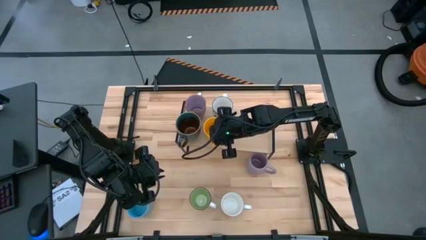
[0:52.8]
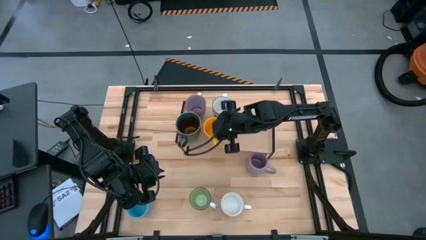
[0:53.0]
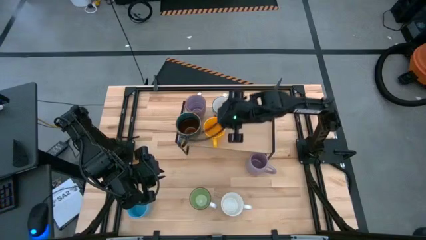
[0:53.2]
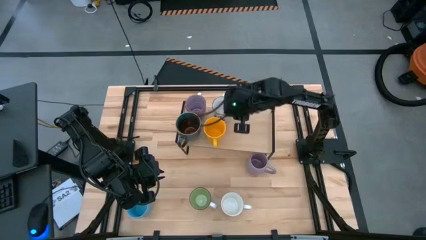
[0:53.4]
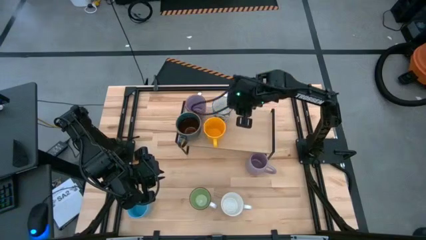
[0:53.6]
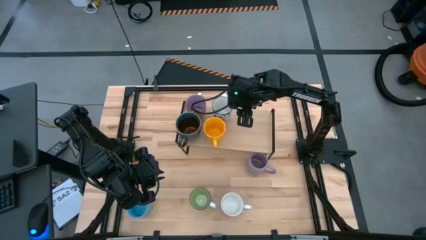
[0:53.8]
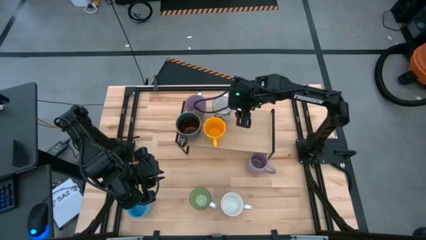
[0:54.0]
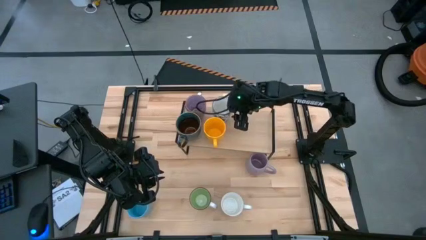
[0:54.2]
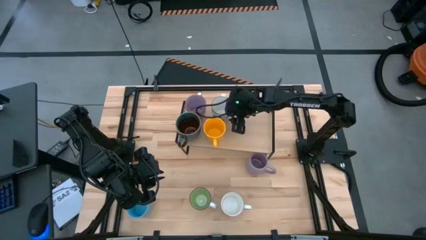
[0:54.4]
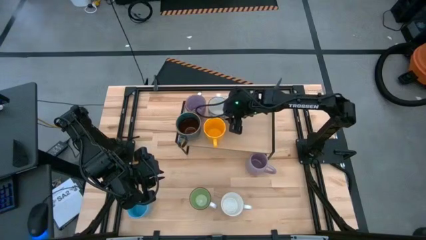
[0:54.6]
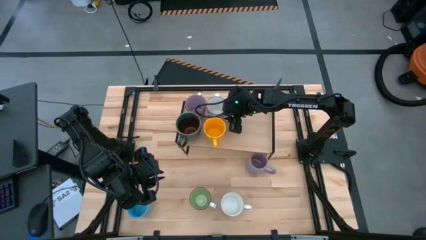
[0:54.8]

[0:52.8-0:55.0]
Task: Place coffee mugs
Adjust the blue patterned mug on the shelf

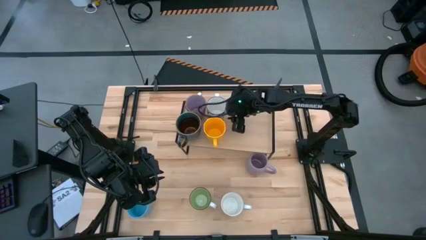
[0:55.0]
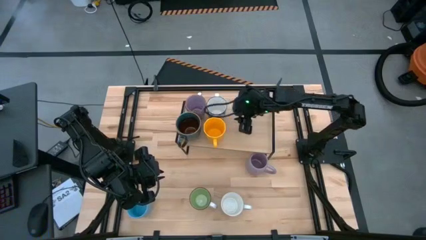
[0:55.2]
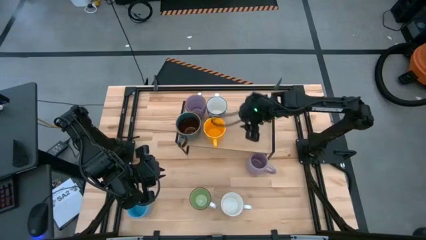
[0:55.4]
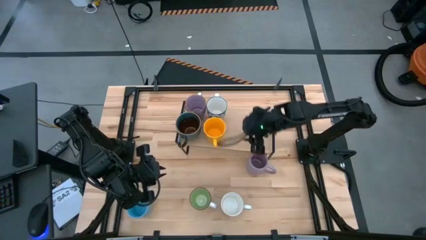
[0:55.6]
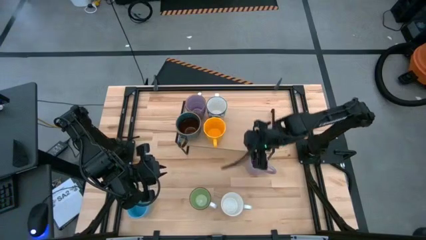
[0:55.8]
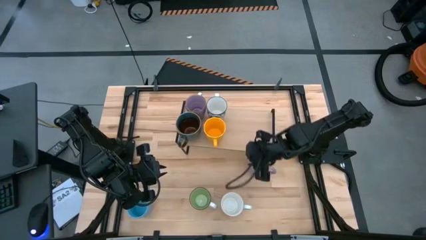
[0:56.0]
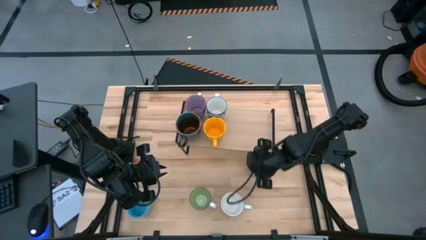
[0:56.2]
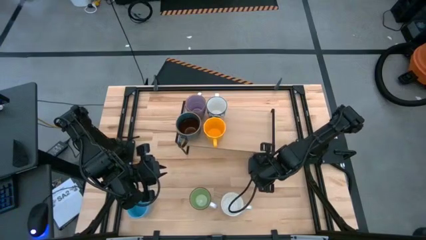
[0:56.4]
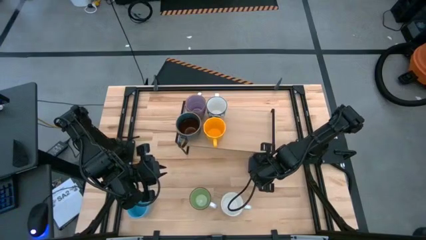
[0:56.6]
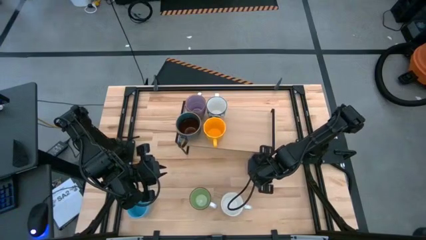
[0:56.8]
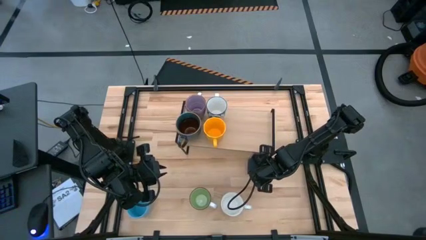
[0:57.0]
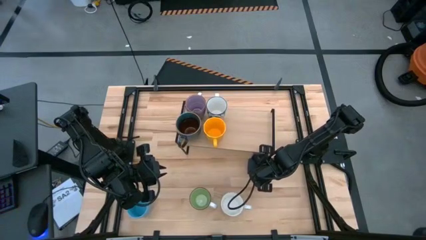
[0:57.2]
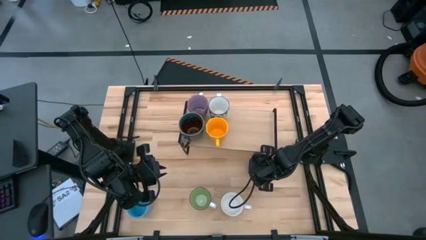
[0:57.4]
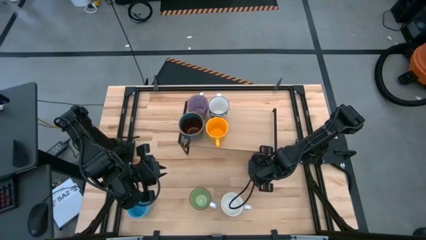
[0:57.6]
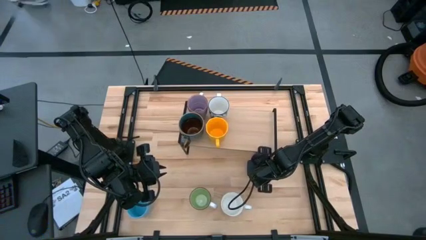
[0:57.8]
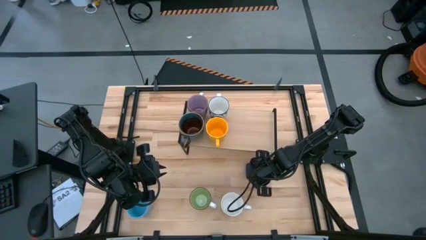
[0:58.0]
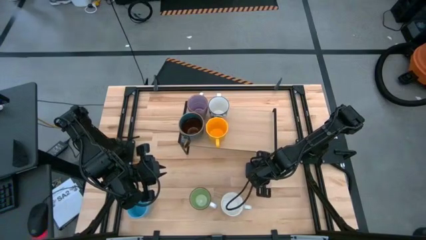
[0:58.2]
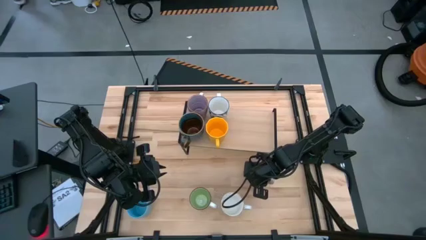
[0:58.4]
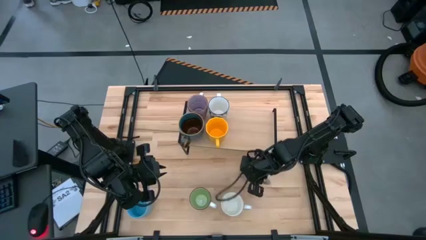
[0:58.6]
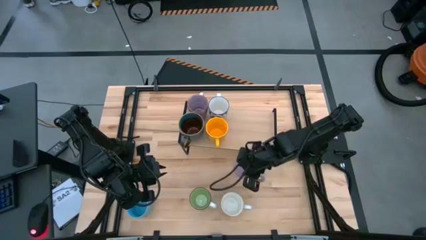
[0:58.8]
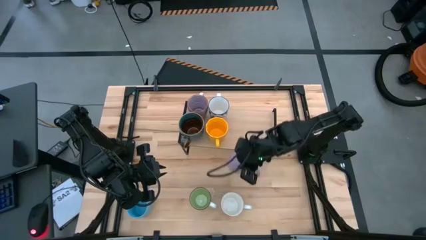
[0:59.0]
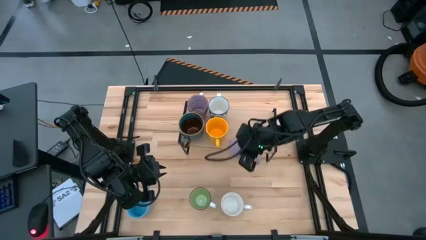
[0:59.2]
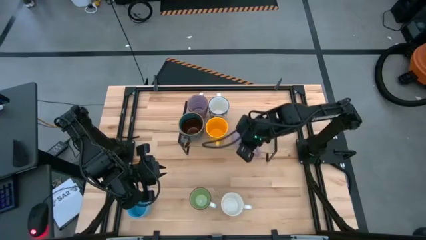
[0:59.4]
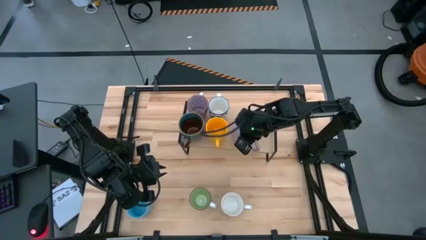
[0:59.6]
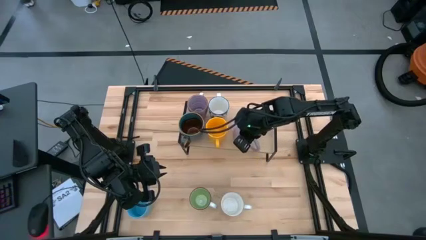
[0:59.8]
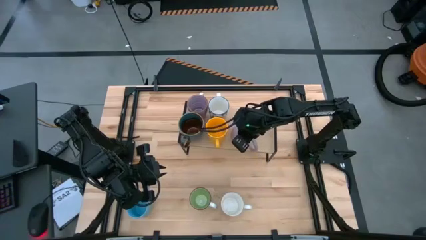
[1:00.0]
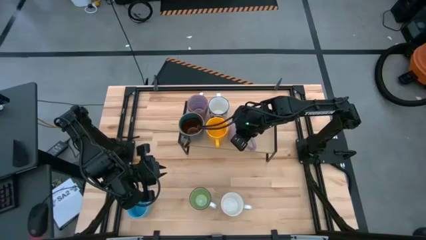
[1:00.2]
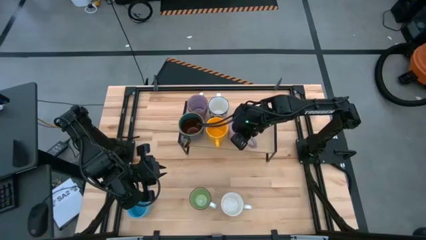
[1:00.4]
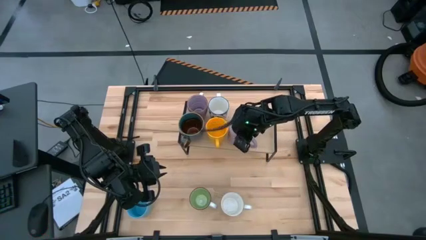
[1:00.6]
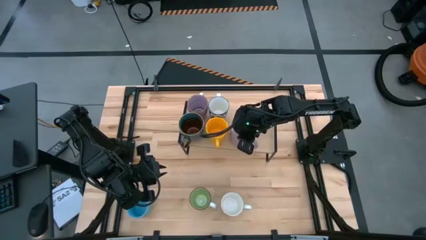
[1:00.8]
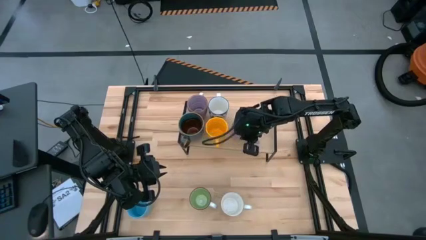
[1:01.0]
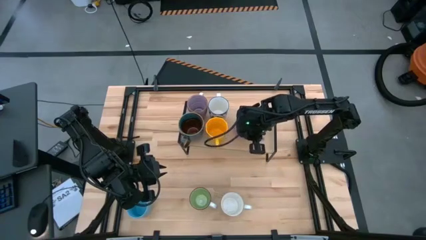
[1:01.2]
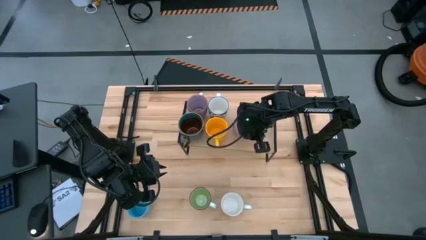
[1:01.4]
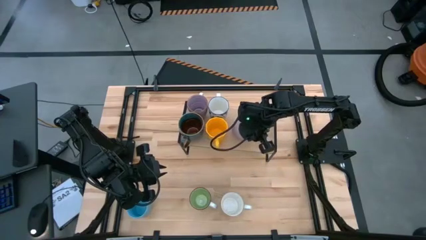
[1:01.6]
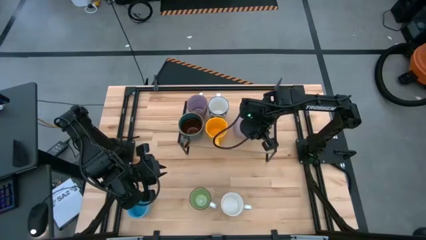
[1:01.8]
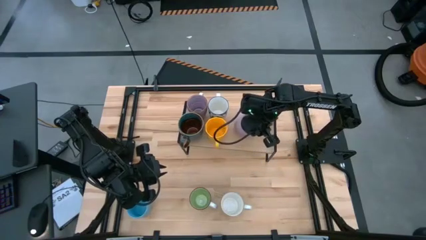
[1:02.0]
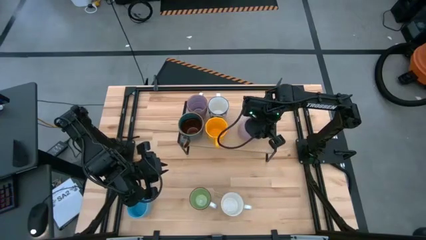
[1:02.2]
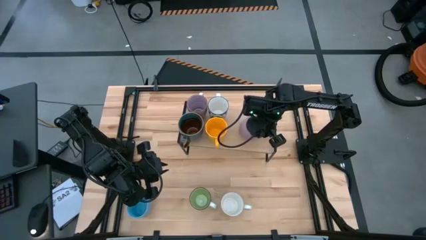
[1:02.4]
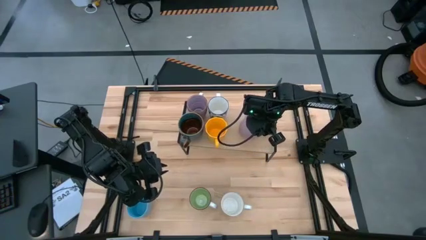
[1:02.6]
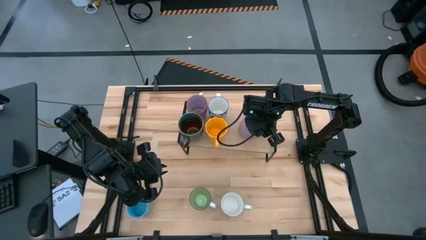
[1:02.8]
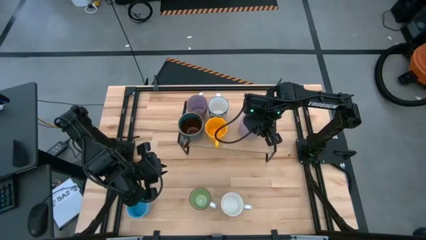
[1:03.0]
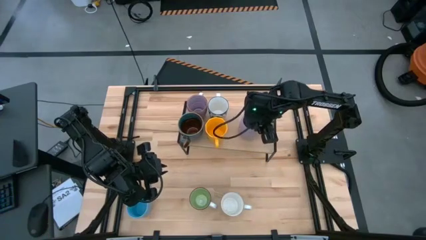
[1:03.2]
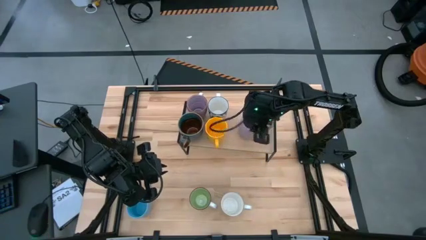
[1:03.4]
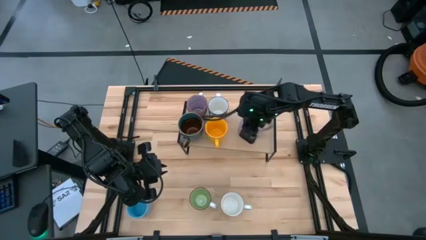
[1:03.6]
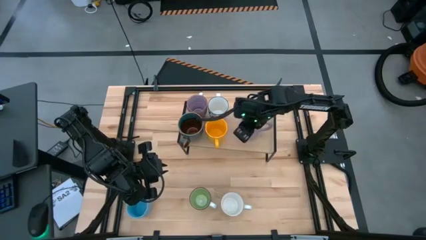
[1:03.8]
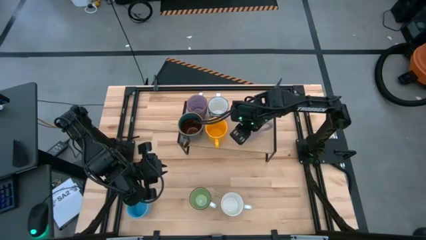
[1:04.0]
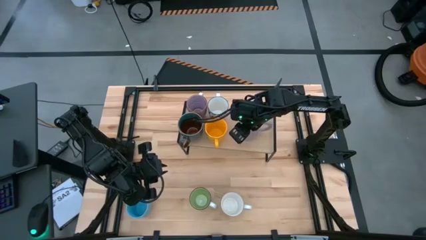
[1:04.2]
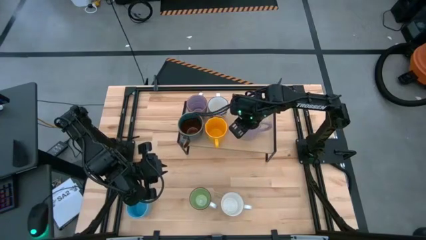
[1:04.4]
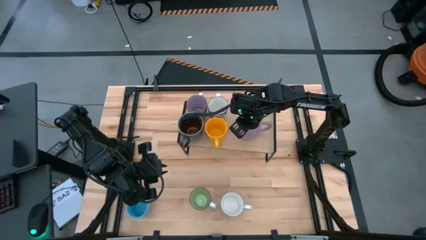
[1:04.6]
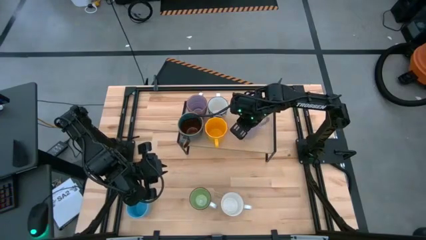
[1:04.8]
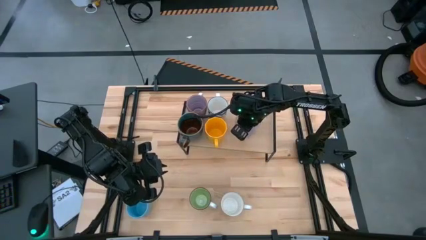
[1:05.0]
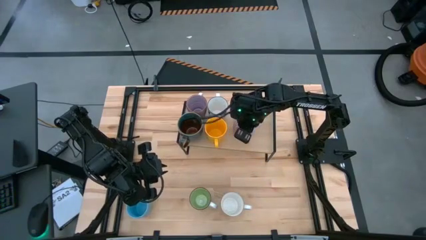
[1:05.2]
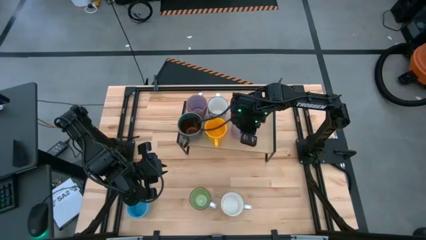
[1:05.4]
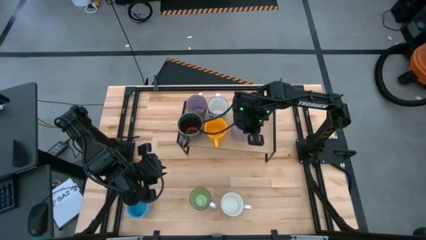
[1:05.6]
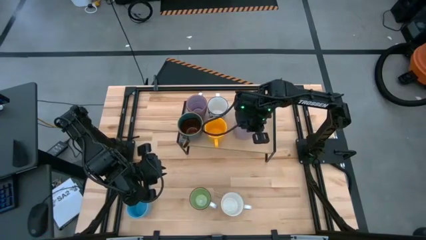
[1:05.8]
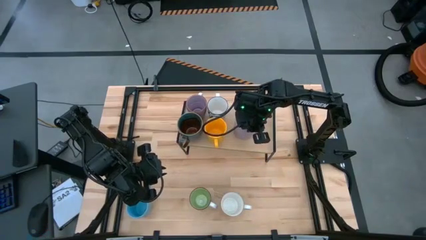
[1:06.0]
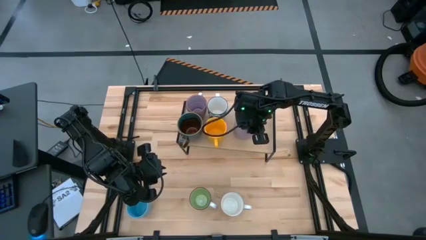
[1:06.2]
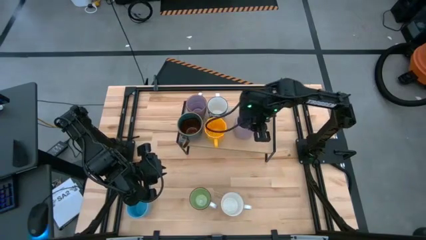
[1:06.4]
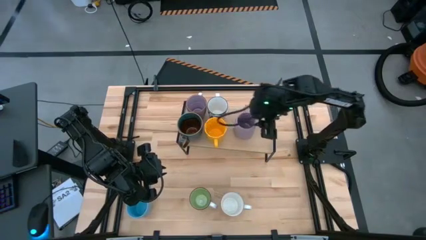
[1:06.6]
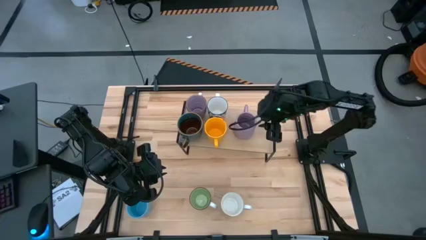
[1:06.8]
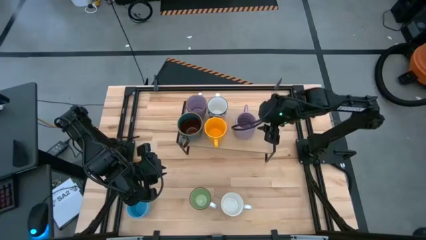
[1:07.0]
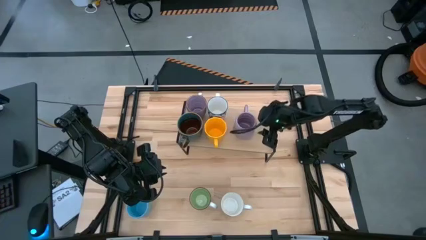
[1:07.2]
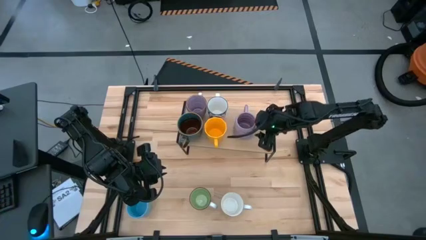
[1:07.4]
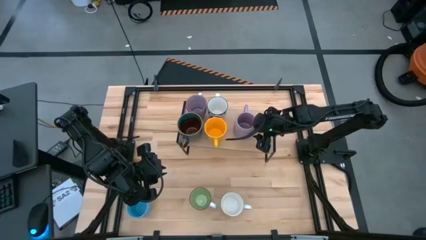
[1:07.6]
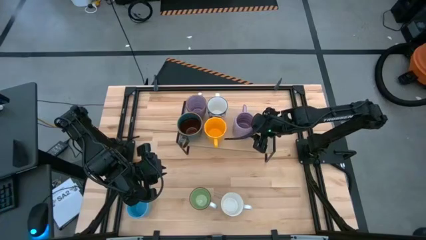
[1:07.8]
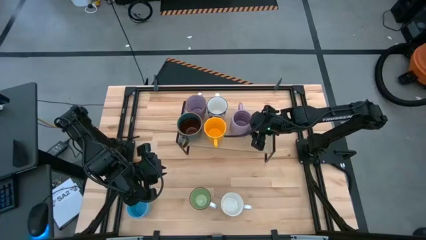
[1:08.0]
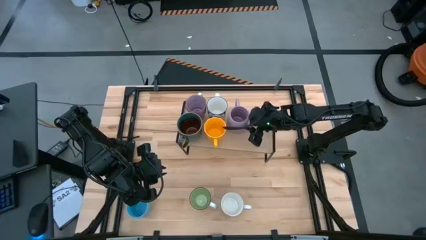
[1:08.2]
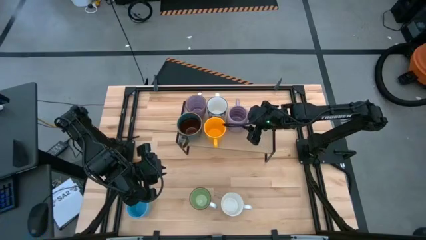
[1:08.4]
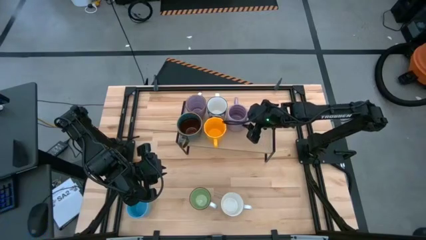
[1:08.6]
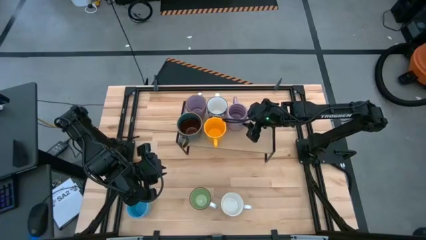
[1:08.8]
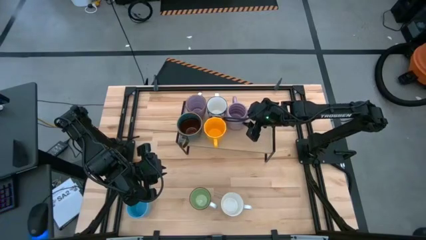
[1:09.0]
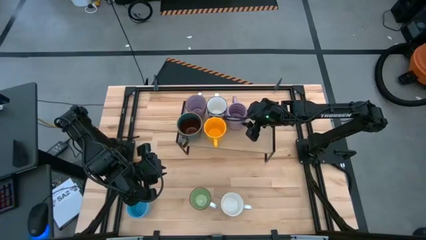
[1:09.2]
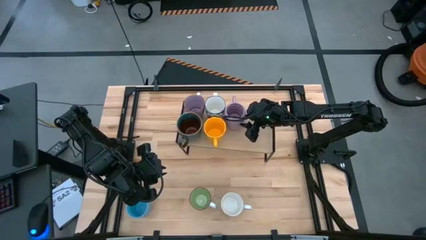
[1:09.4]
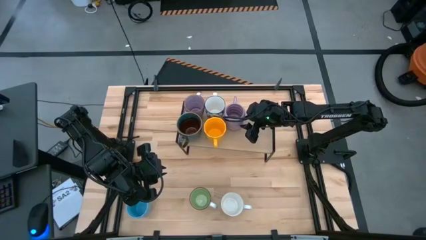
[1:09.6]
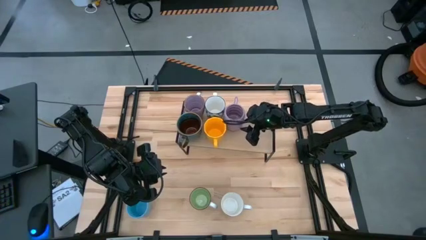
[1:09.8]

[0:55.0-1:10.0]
Put the violet mug on the shelf
